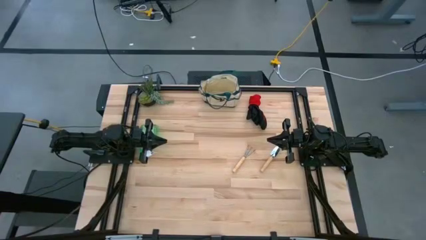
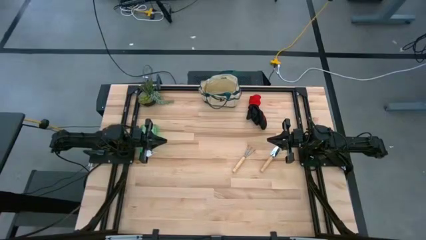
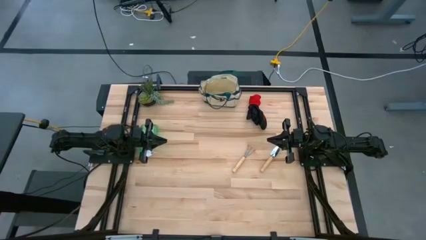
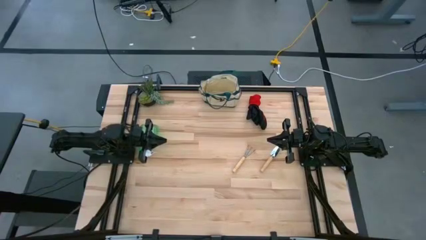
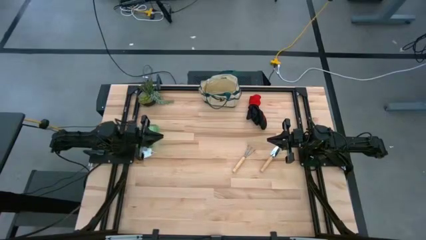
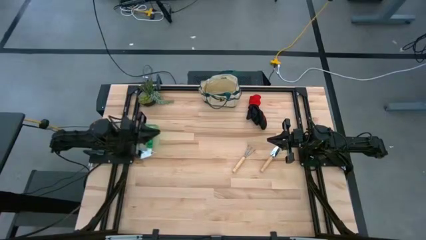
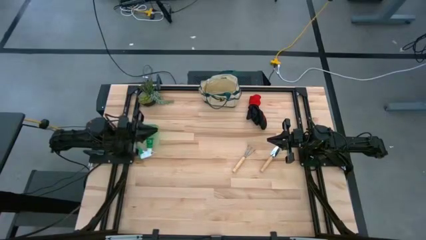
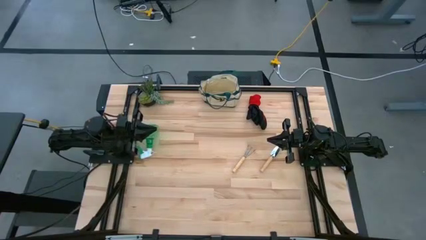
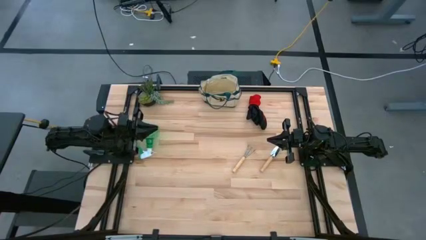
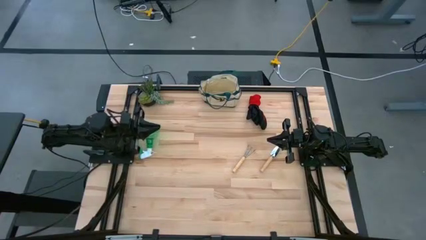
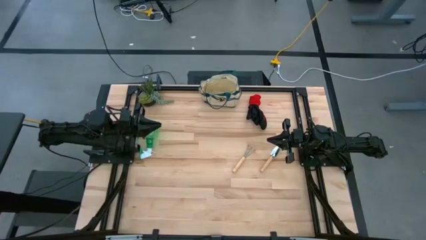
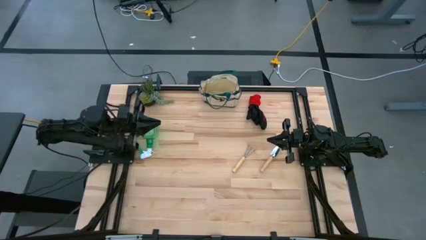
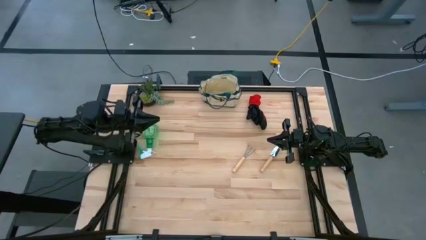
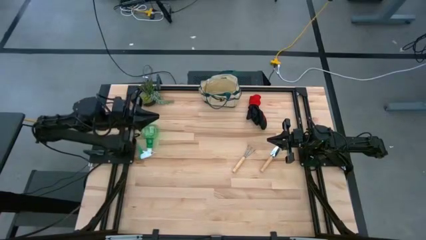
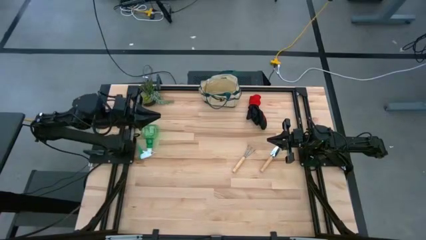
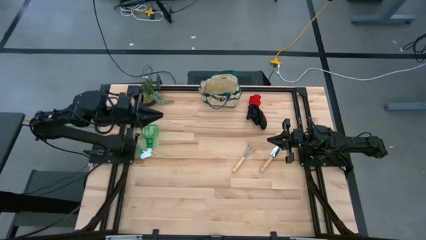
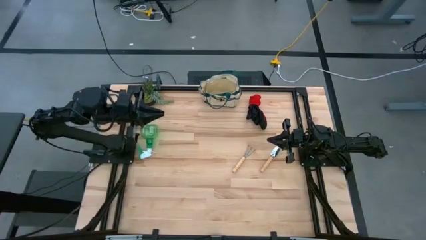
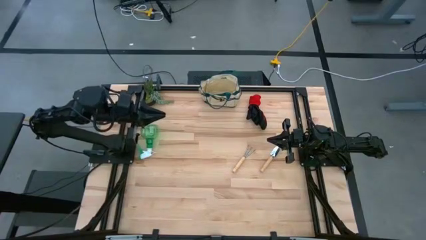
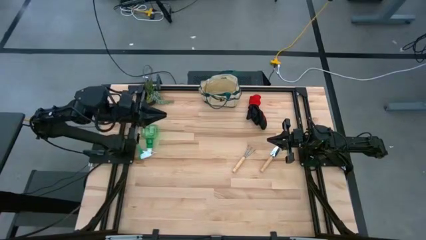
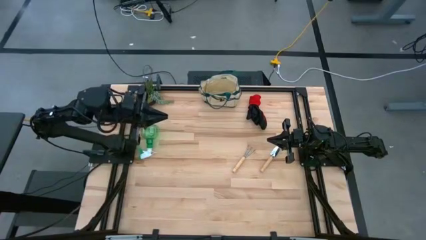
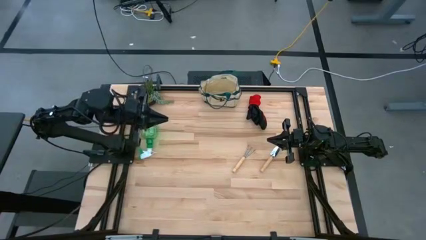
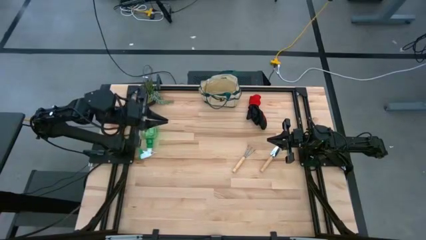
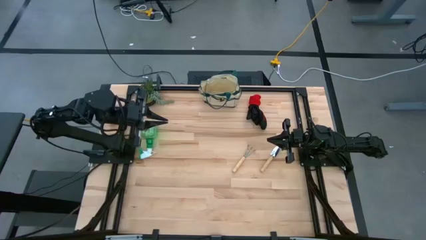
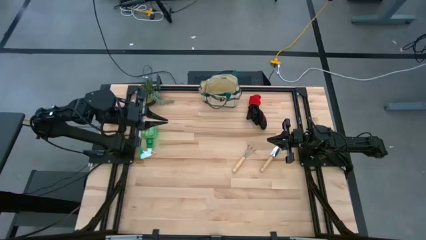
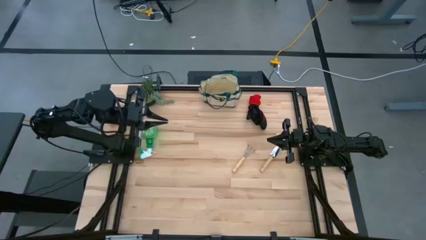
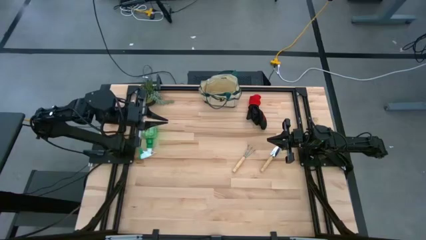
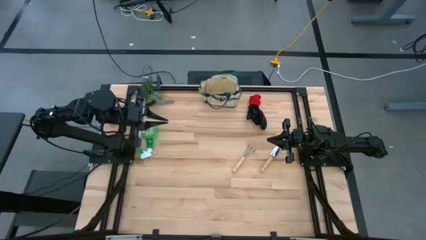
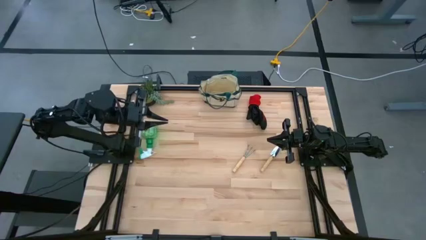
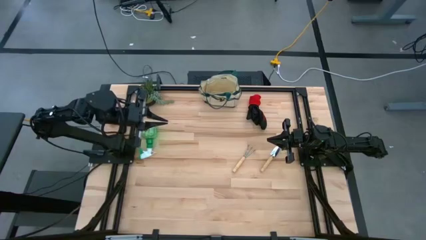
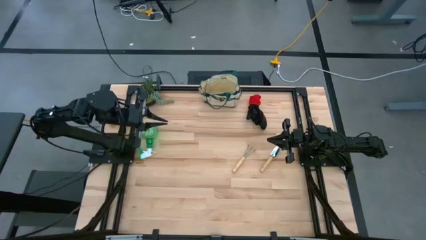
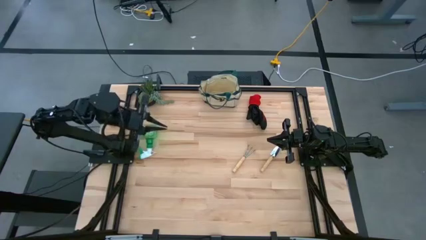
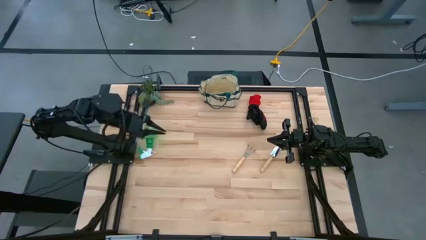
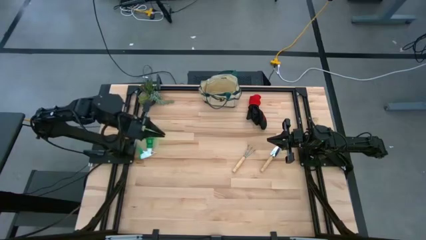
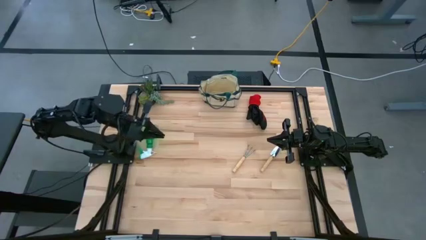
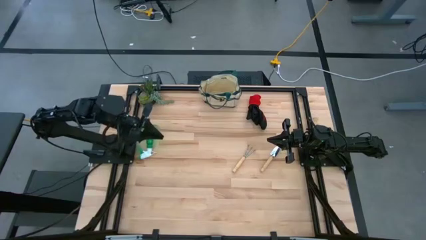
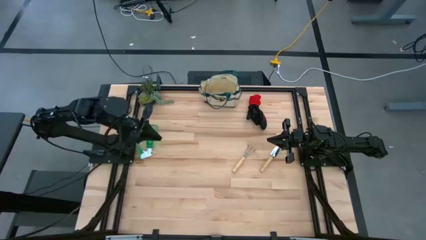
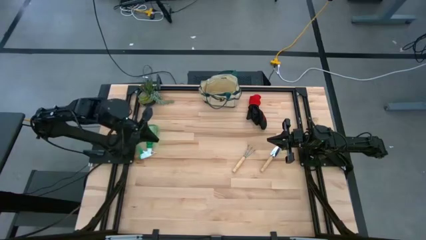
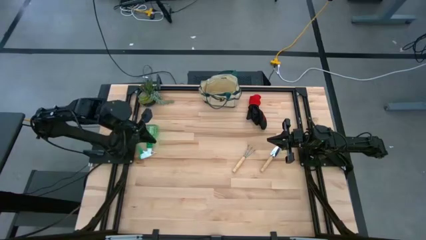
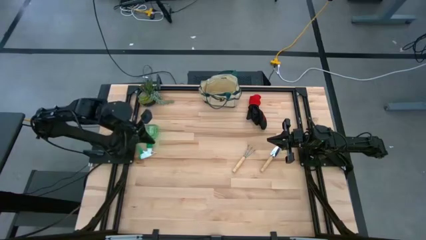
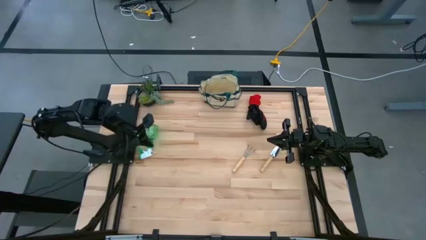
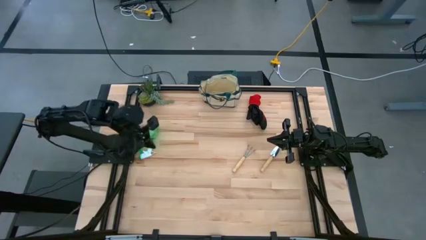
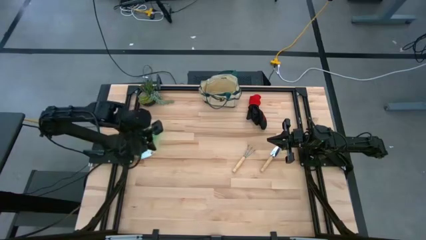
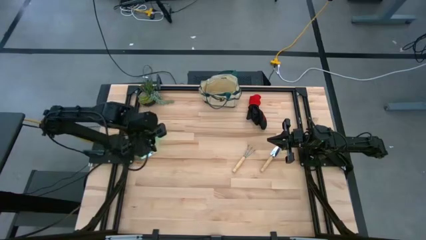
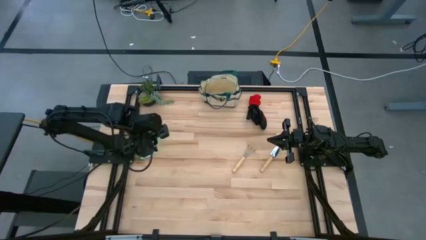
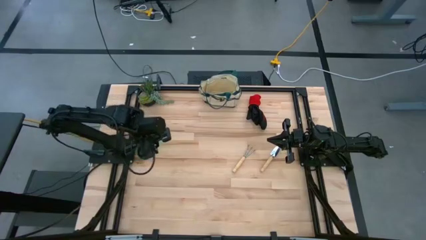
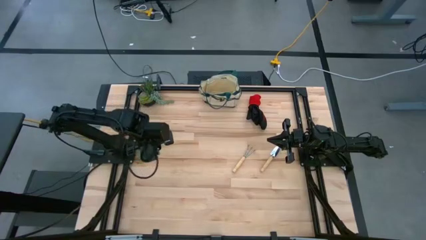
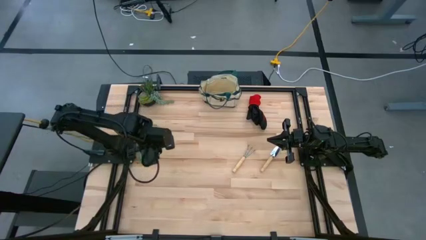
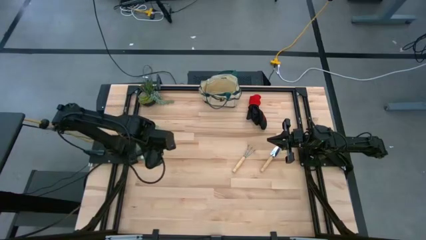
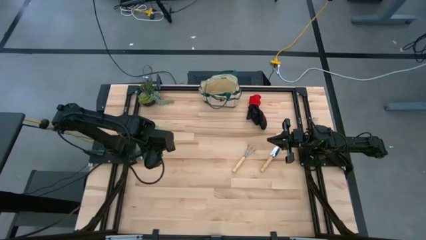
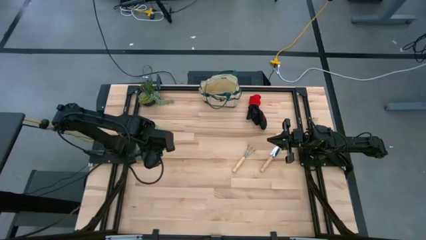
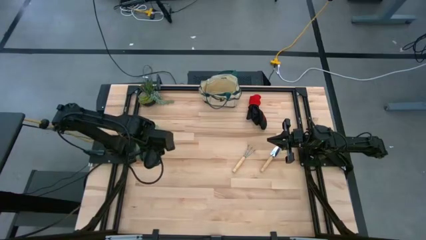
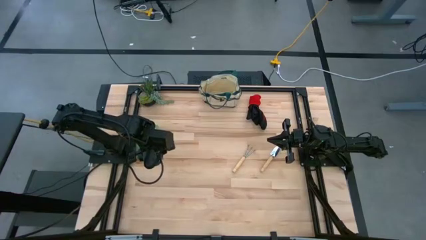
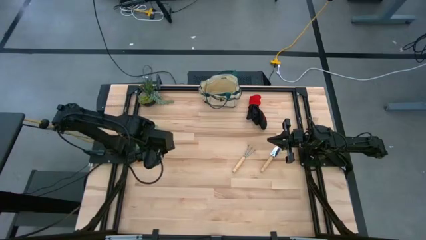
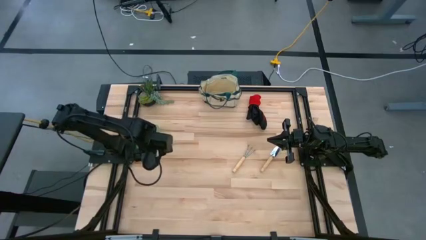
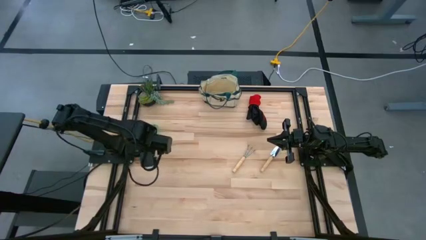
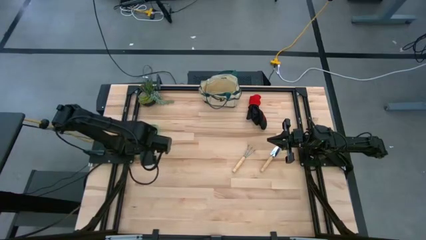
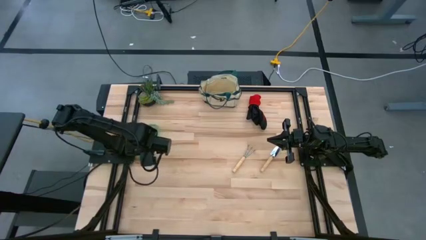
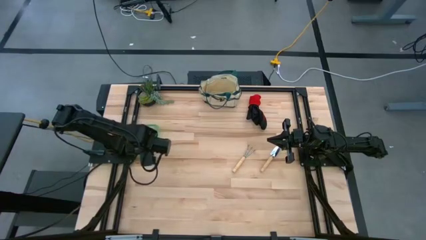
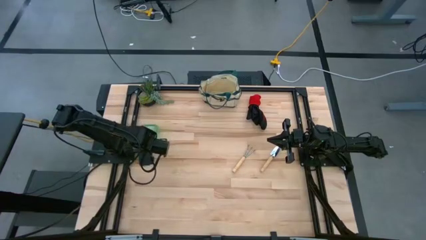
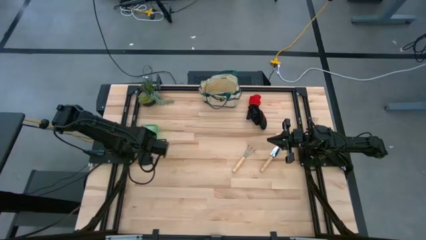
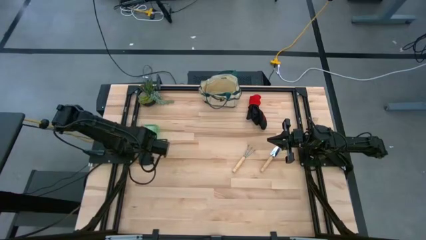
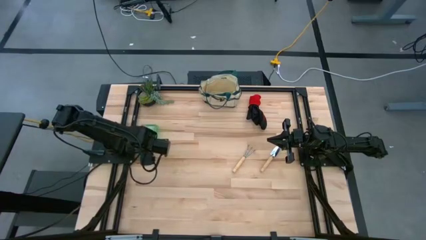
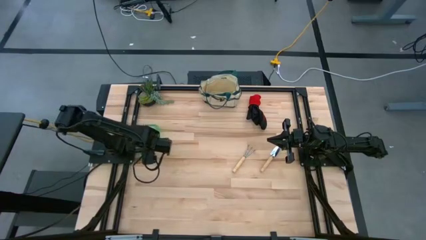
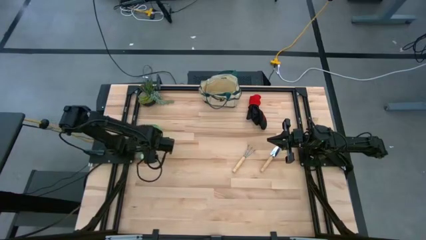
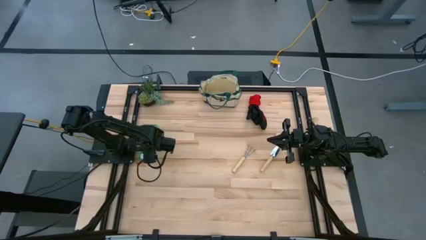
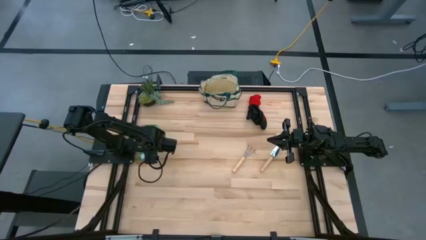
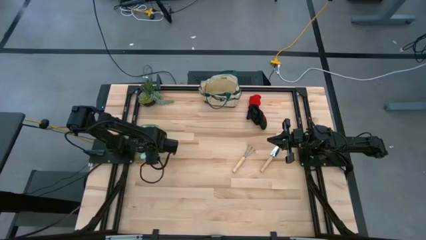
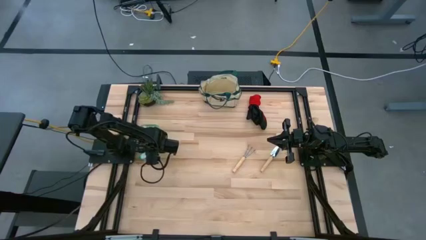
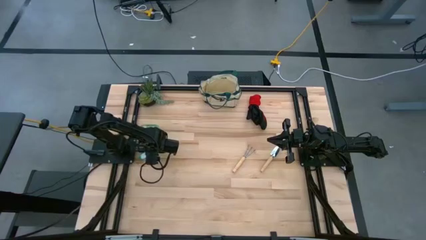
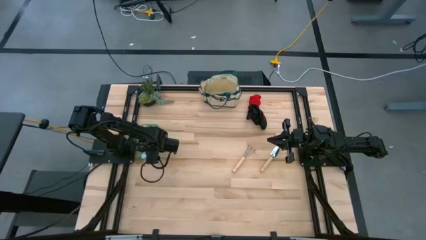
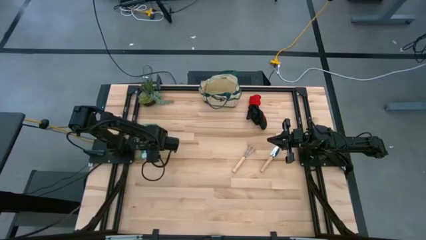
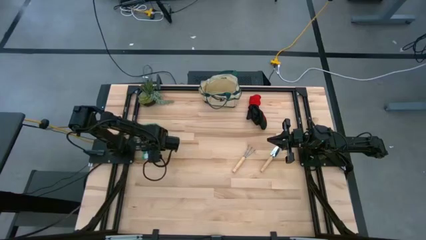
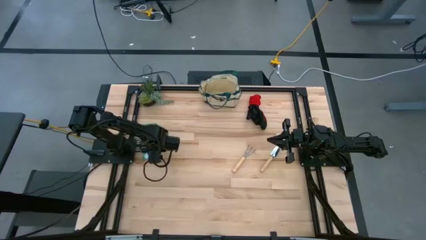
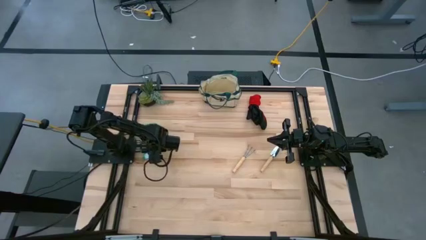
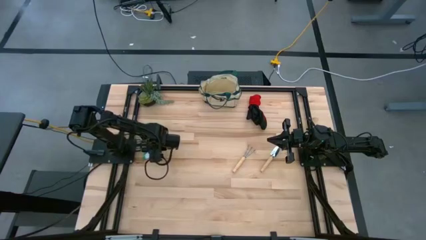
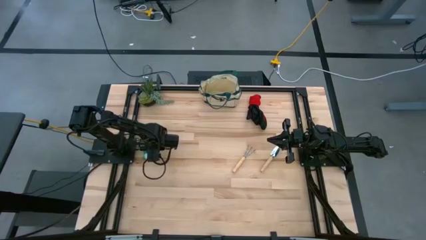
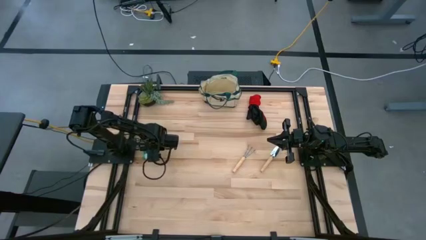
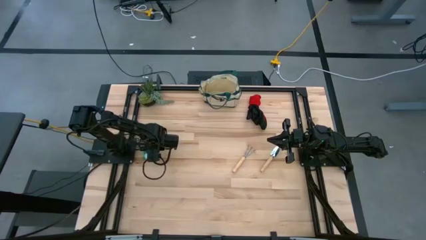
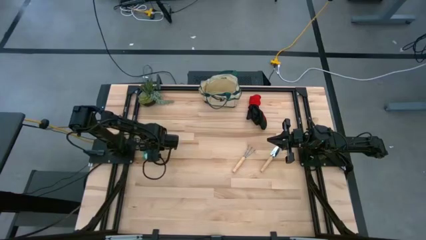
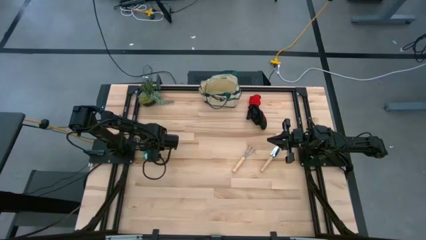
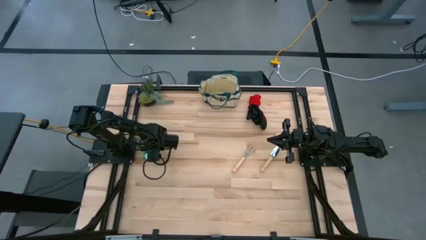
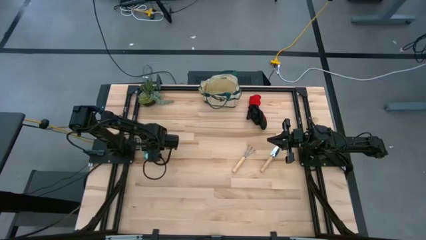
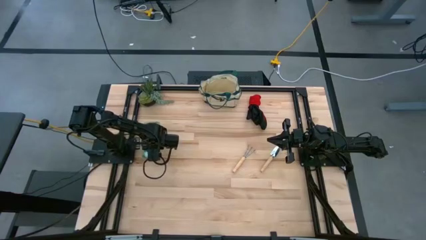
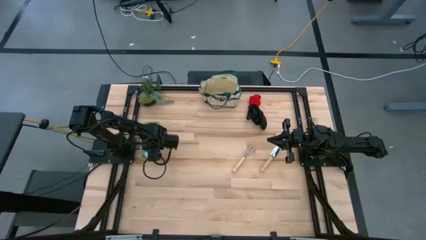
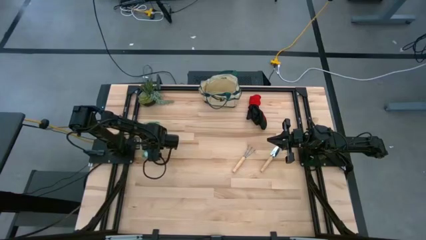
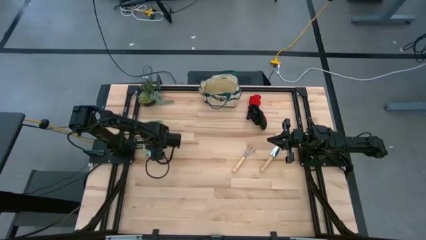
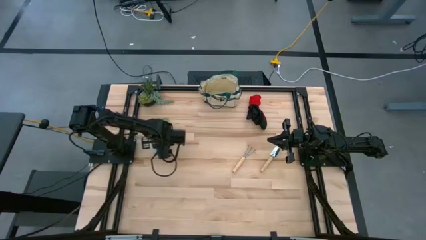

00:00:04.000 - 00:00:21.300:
Task: Pick & Place Garden tools in Gardening bag
Put the green spray bottle into the white gardening bag
